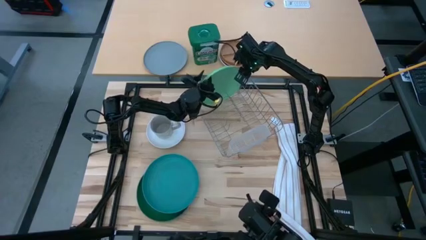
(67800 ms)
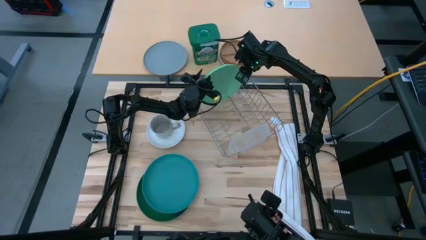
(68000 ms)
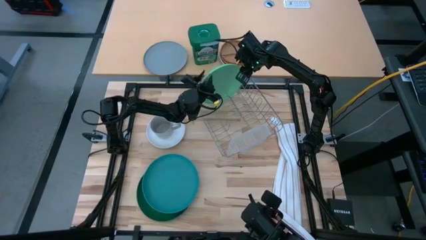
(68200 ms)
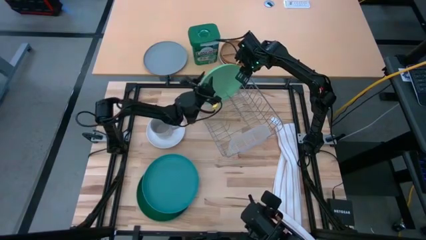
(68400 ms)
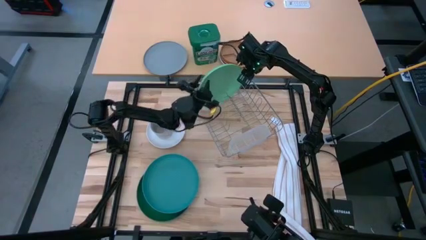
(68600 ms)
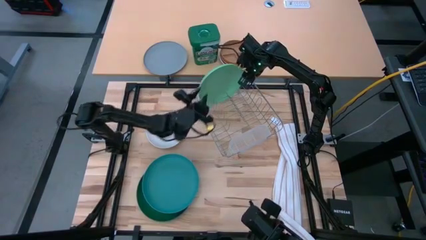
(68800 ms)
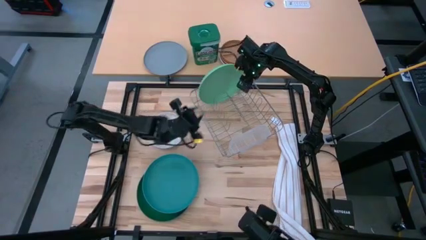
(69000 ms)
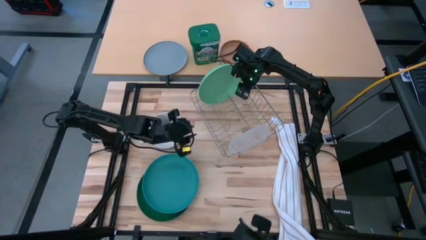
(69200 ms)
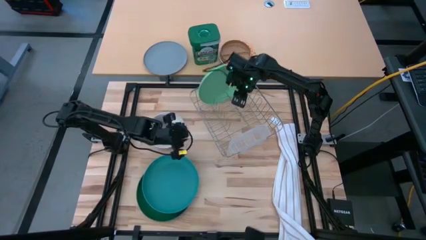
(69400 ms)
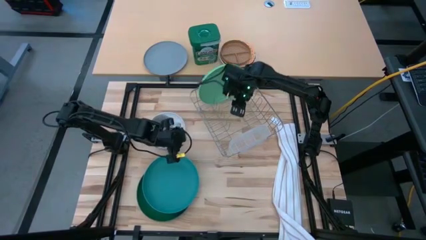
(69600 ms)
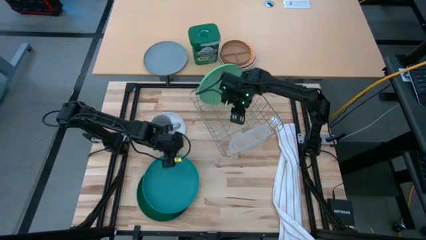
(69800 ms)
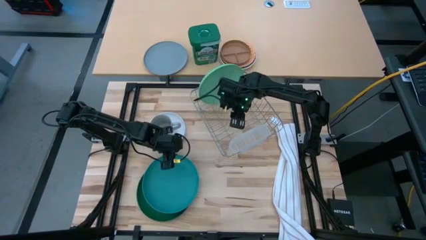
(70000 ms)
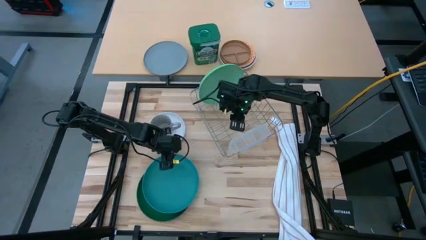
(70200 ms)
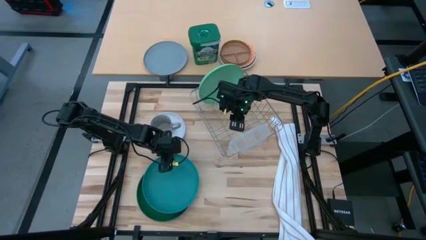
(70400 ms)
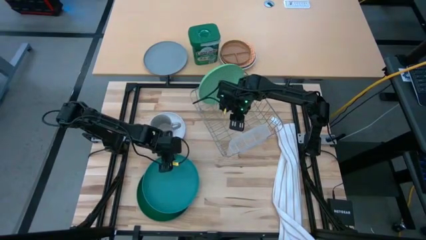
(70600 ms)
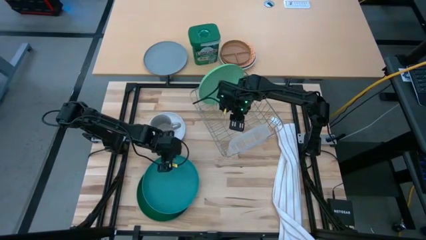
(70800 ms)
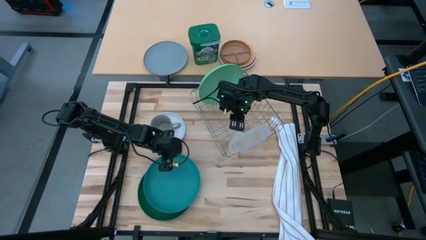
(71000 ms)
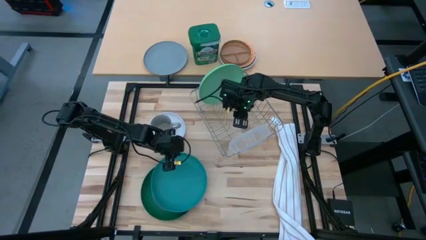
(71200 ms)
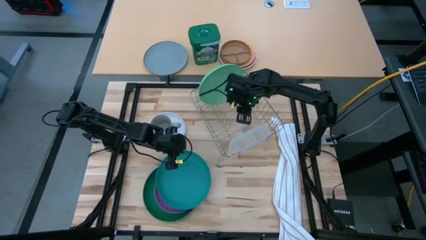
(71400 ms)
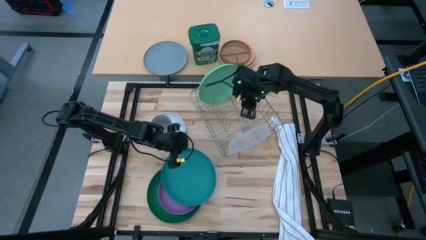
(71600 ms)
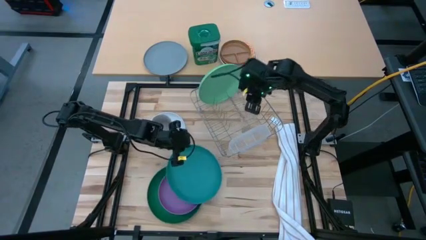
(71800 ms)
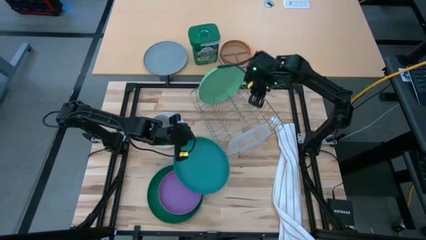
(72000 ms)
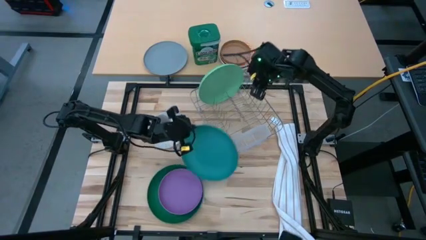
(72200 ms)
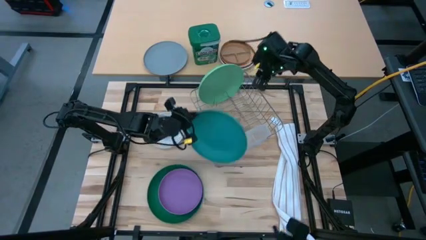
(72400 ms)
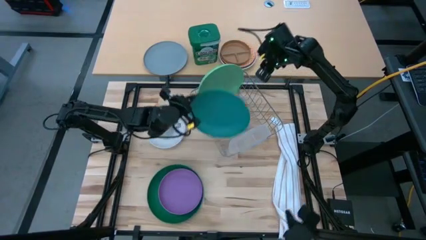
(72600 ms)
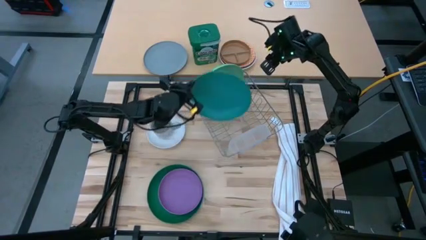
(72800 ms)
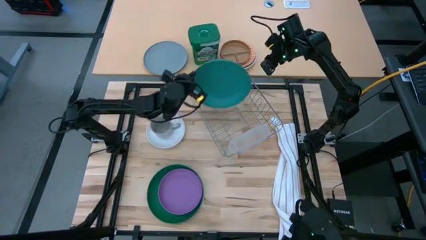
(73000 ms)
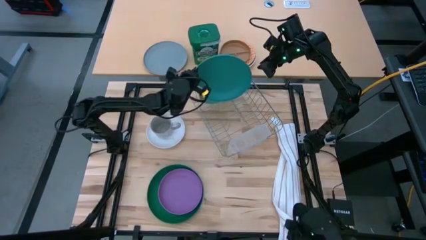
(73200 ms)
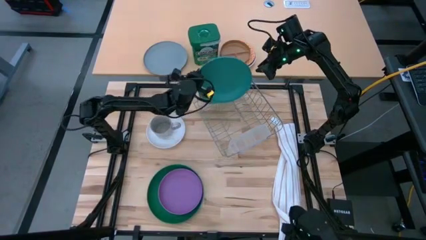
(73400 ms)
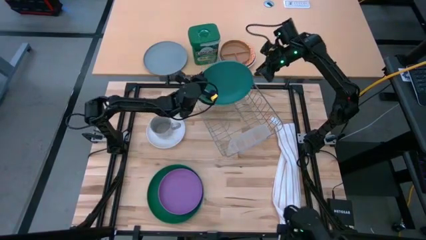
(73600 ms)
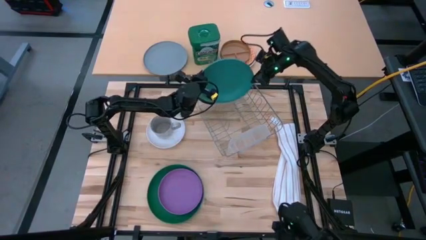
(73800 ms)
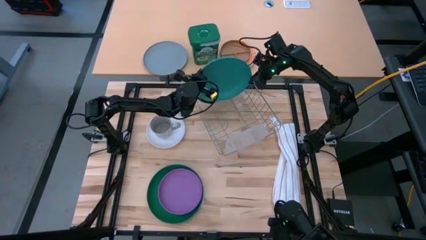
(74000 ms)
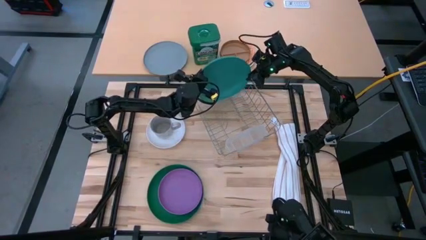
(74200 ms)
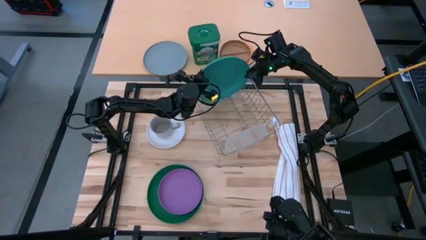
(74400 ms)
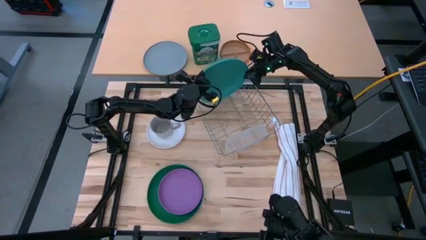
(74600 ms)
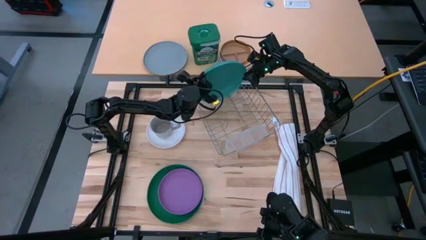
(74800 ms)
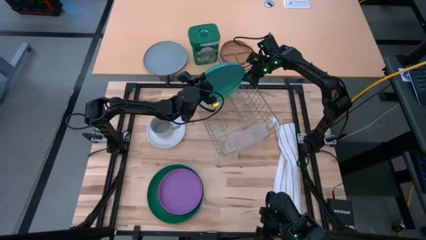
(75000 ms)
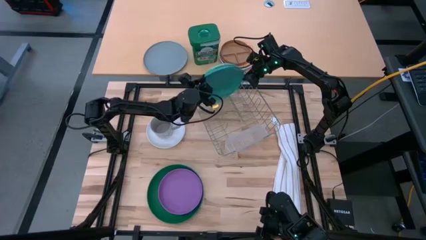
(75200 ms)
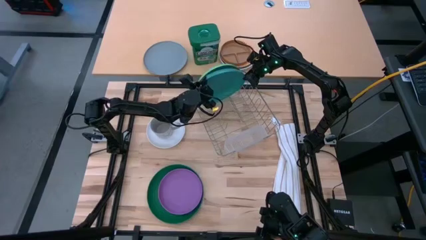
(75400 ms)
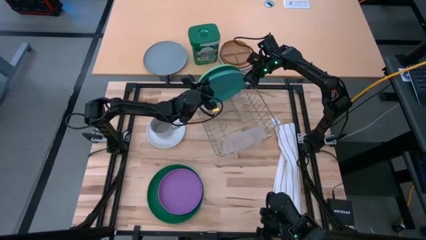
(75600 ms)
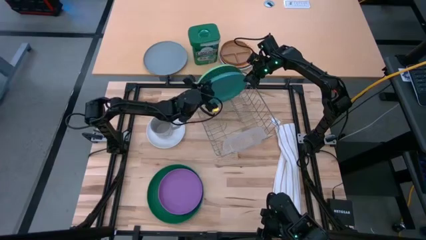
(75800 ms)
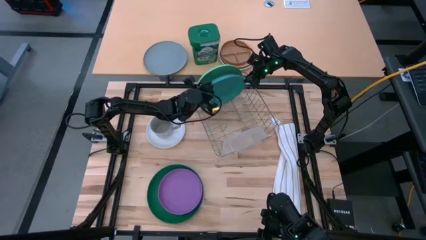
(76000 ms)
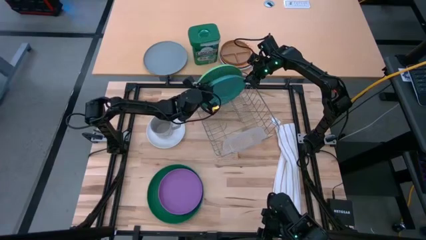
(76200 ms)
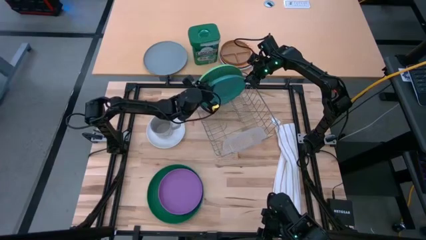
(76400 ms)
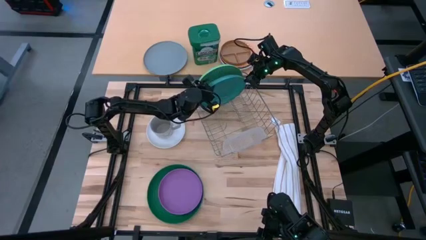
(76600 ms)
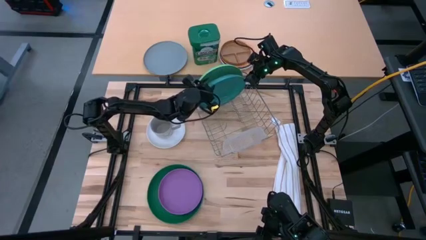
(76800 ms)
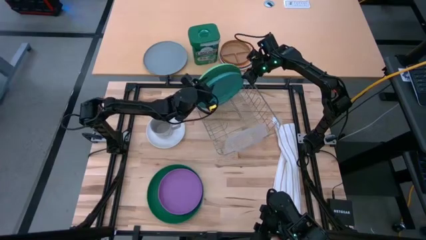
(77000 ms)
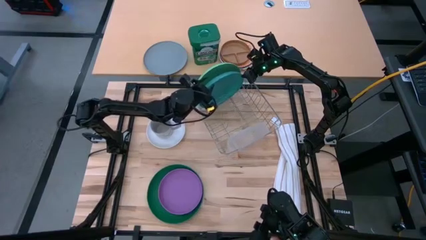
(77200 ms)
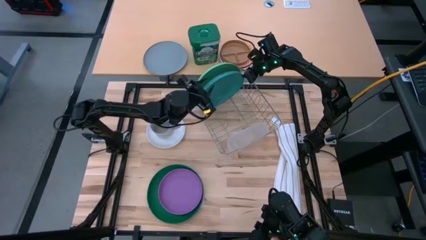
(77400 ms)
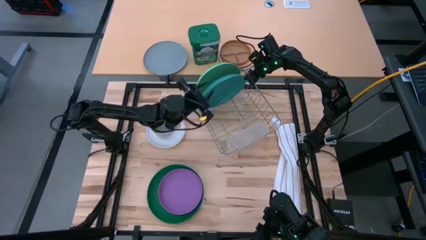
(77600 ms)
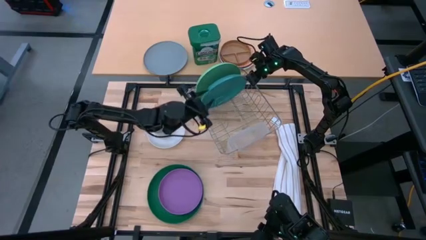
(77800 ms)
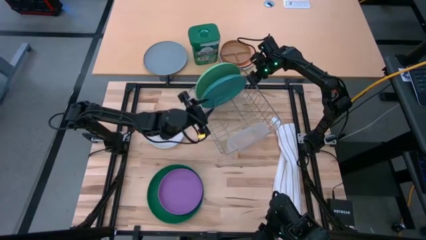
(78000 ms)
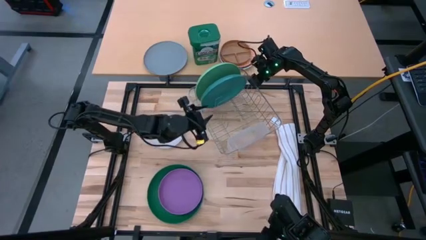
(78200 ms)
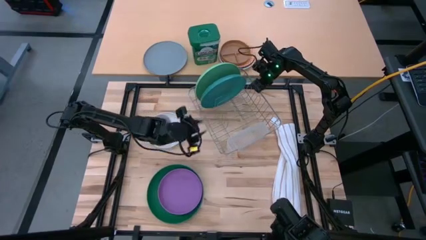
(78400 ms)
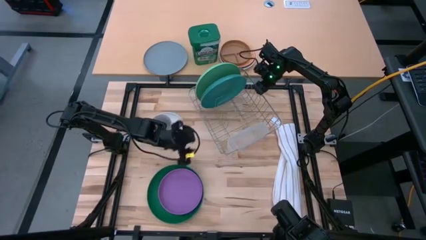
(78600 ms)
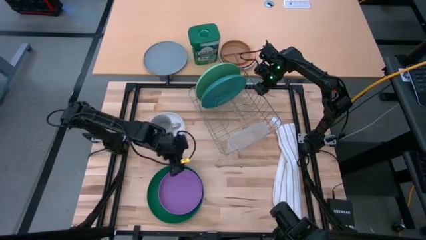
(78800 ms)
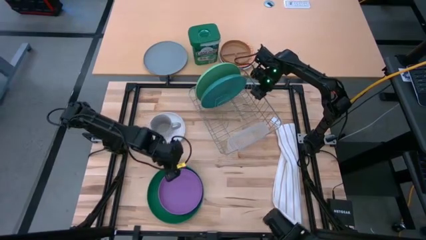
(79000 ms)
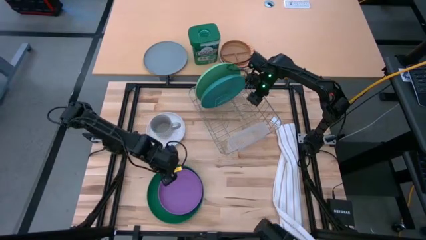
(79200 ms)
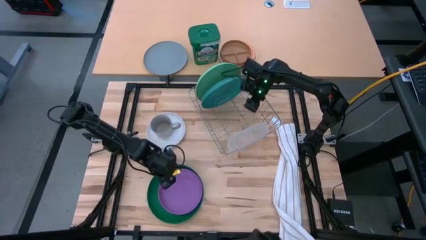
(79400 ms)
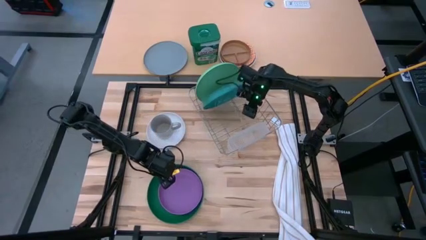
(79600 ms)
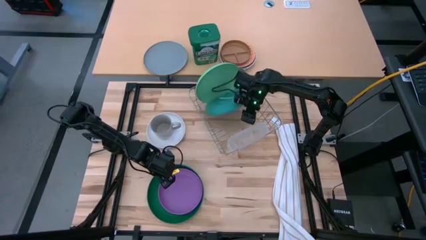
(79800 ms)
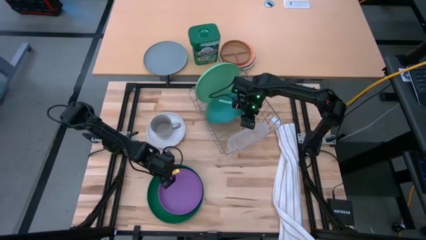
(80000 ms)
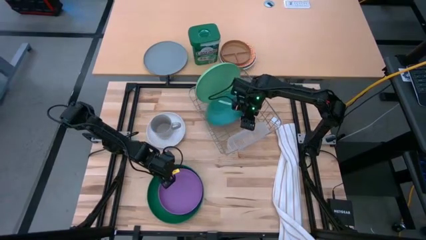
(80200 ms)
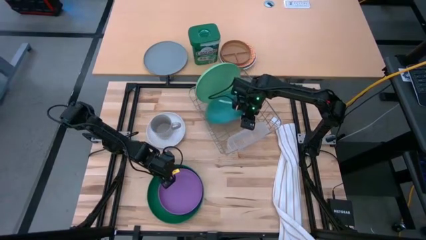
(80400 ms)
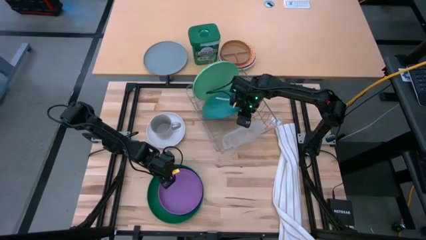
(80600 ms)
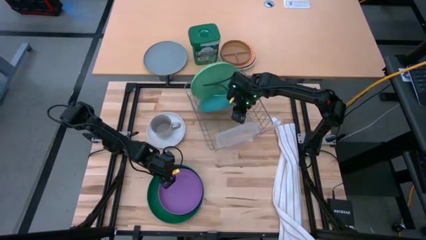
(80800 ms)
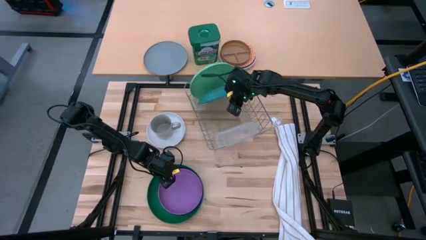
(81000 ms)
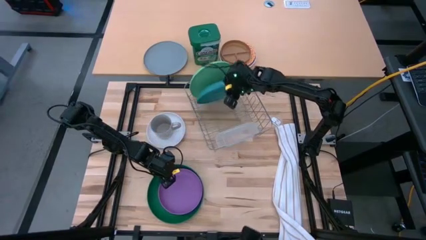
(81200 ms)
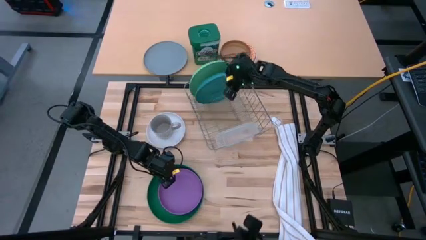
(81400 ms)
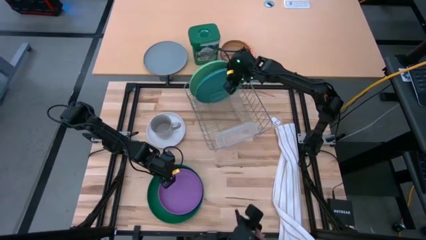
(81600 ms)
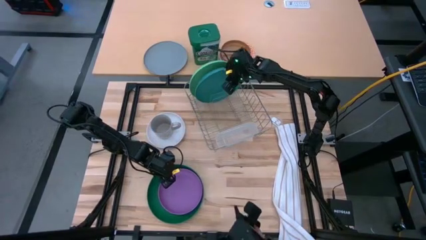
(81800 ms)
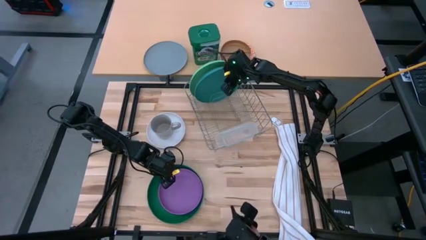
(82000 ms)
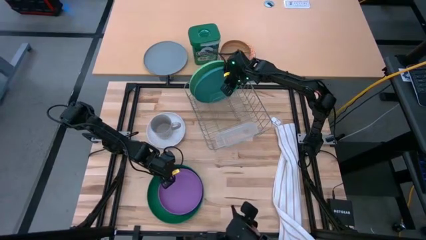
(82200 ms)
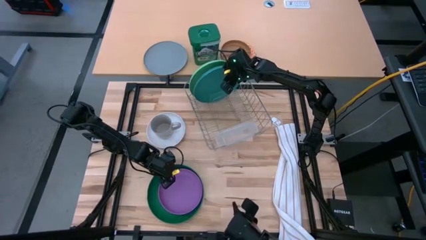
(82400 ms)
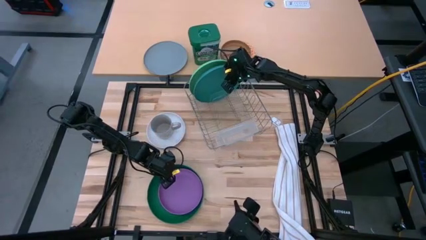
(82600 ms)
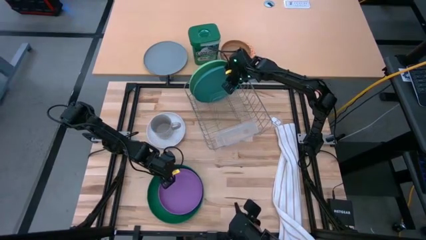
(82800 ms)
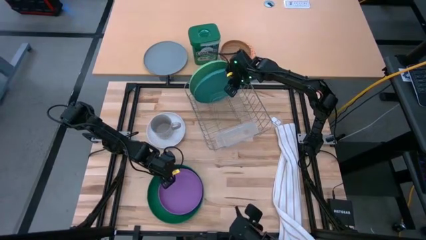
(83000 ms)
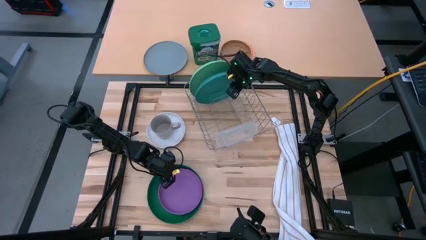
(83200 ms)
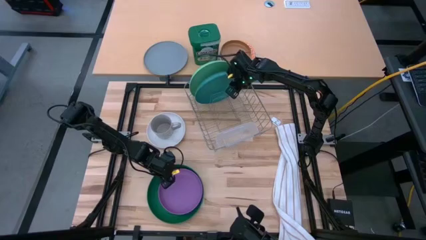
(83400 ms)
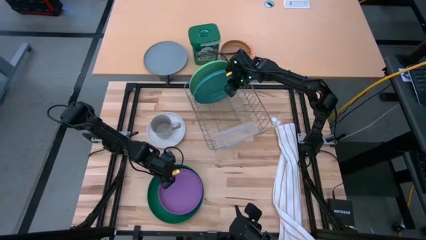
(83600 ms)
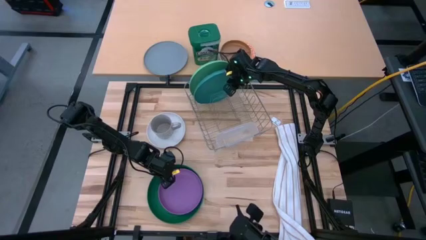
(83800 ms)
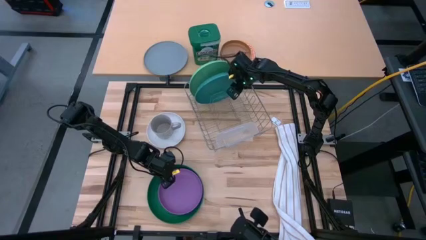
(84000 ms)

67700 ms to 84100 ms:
Task: Sort dishes
Put the blue plate into the dish rack

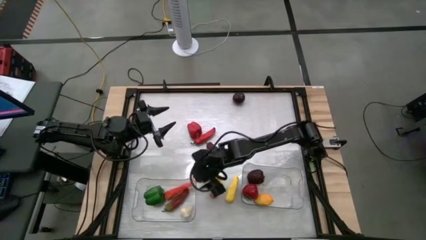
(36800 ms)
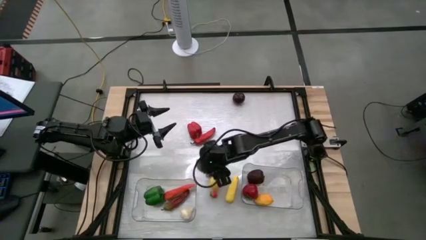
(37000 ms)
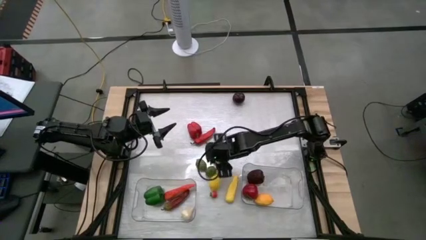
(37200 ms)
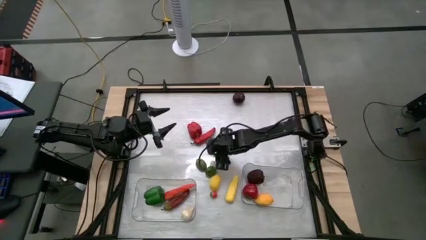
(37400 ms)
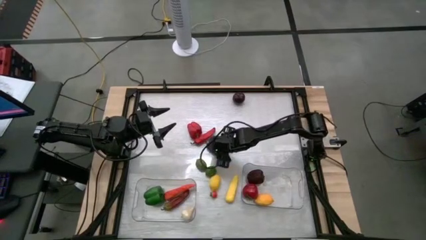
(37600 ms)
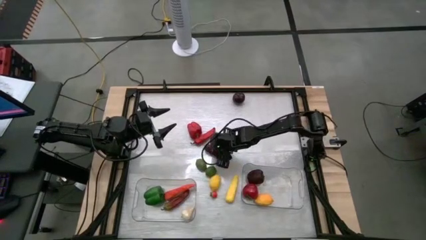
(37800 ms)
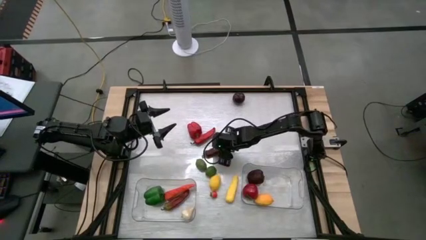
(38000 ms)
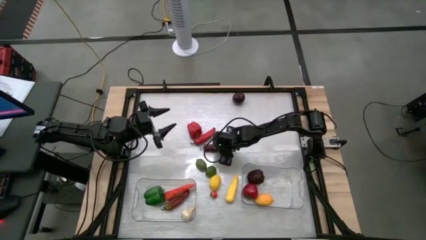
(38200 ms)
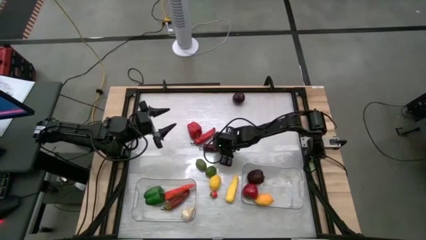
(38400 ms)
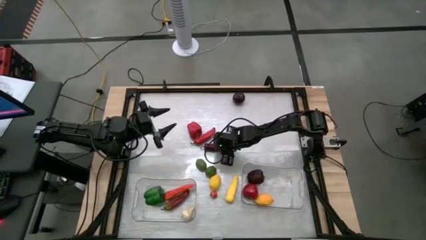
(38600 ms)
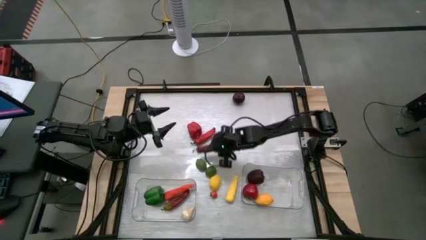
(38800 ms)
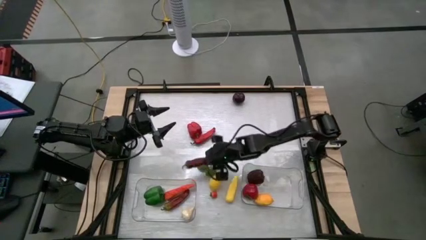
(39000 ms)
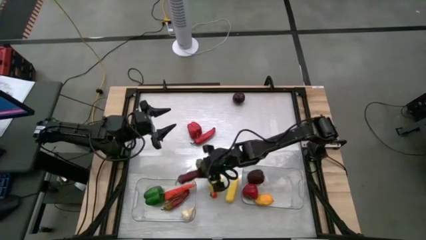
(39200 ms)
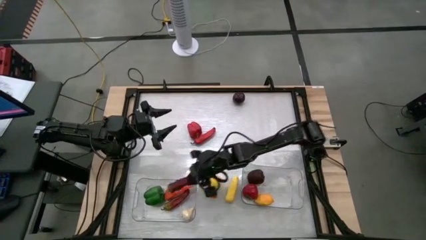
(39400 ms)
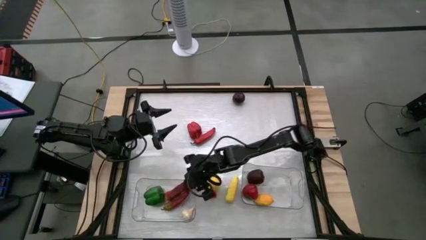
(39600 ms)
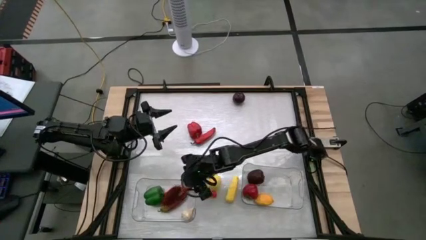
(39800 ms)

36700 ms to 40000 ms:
Task: Sort produce into baskets
Put the dark red bell pepper into the left transparent bin
